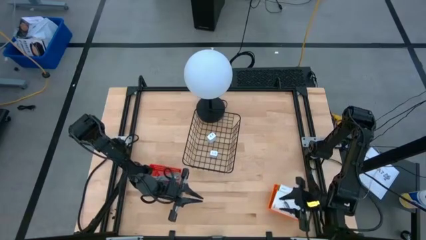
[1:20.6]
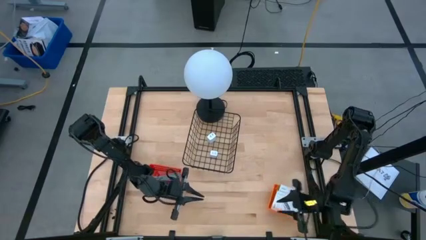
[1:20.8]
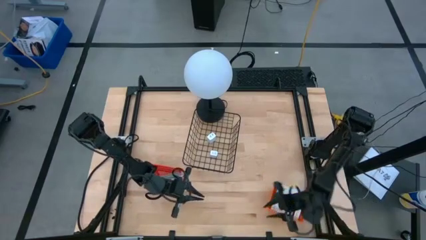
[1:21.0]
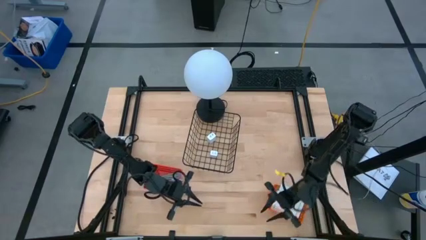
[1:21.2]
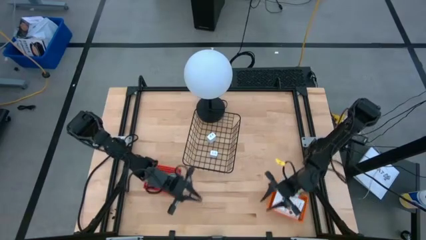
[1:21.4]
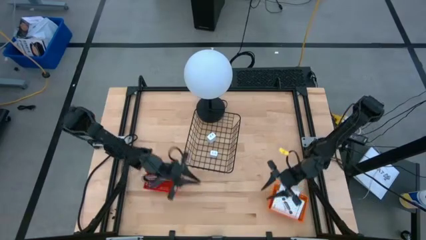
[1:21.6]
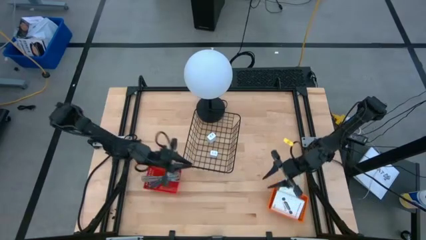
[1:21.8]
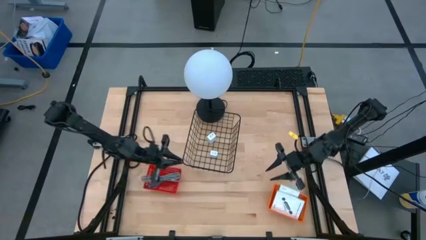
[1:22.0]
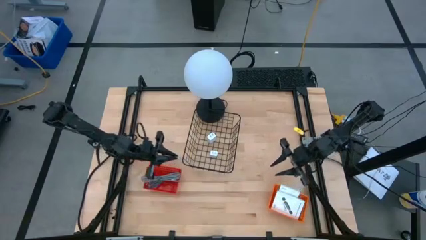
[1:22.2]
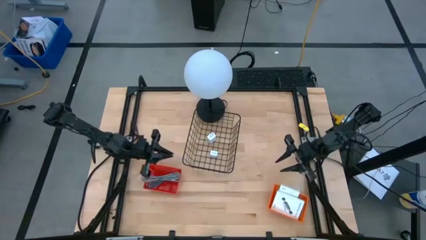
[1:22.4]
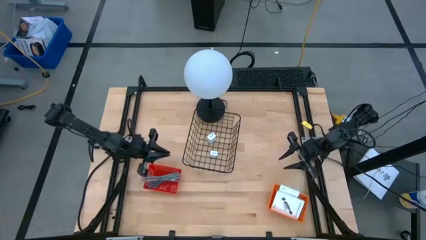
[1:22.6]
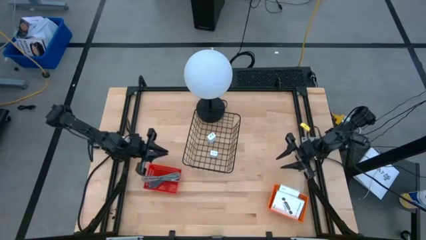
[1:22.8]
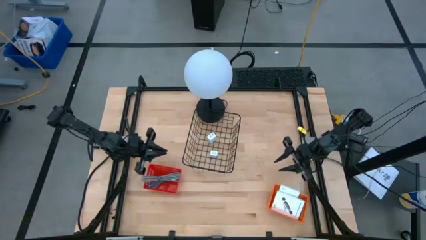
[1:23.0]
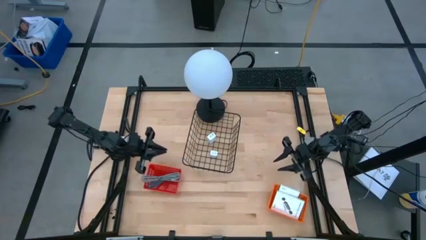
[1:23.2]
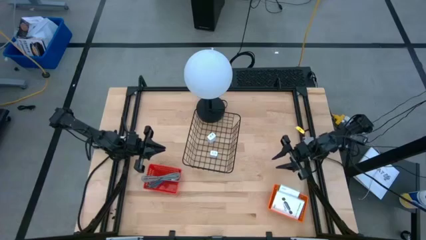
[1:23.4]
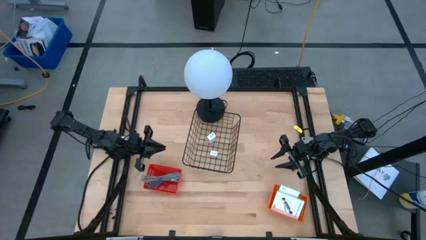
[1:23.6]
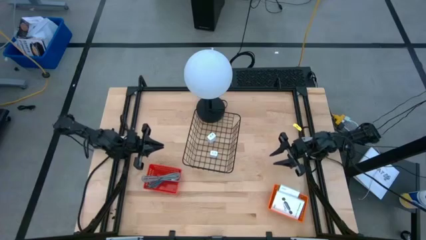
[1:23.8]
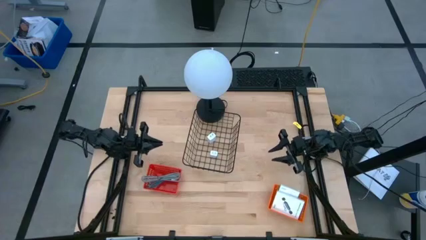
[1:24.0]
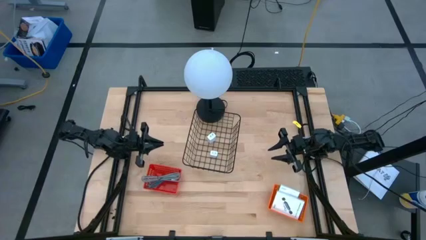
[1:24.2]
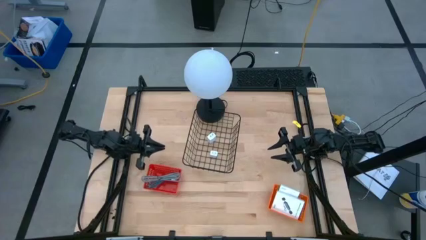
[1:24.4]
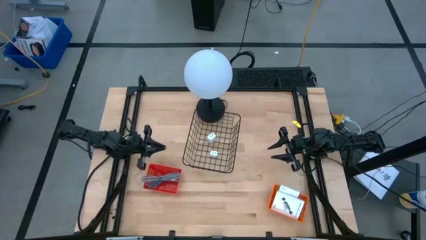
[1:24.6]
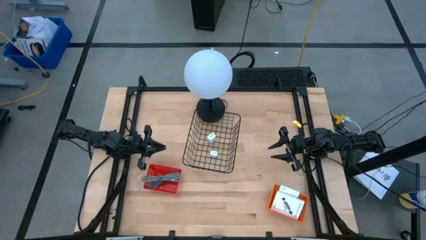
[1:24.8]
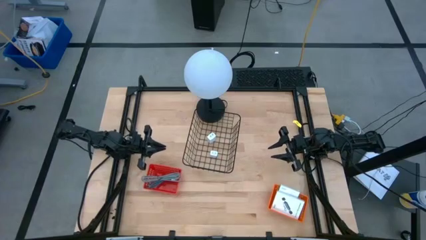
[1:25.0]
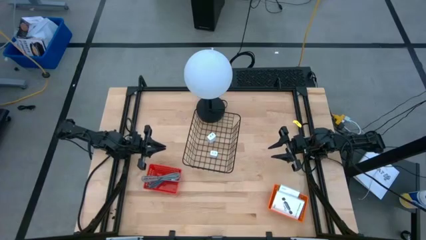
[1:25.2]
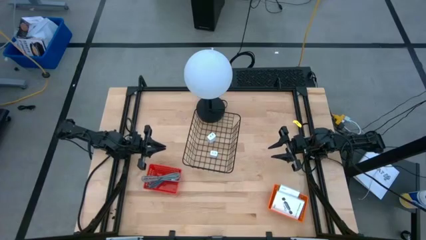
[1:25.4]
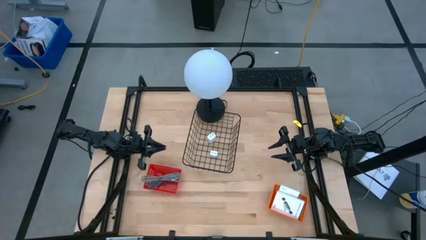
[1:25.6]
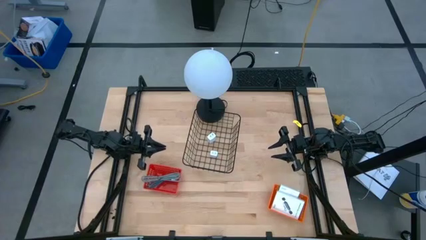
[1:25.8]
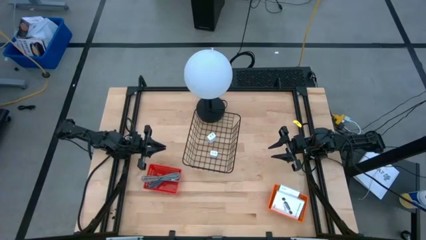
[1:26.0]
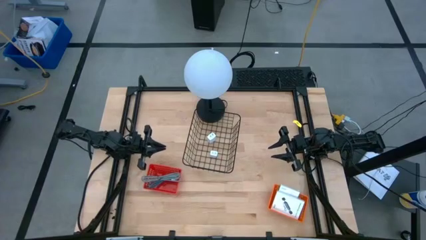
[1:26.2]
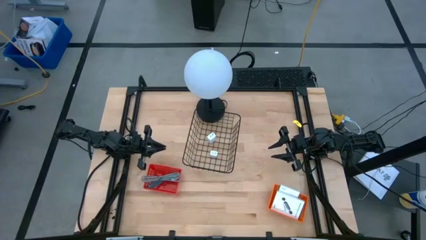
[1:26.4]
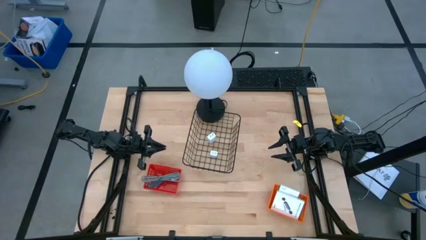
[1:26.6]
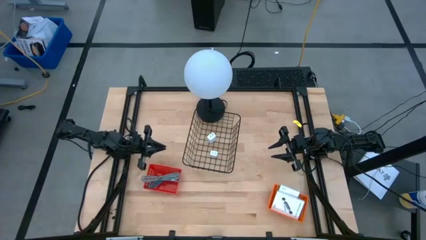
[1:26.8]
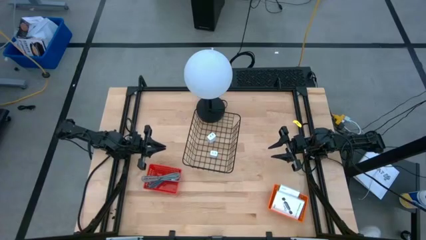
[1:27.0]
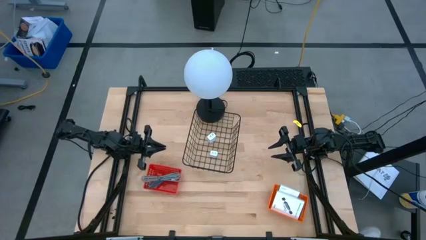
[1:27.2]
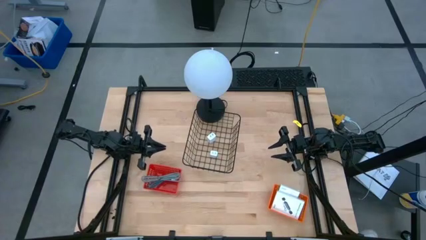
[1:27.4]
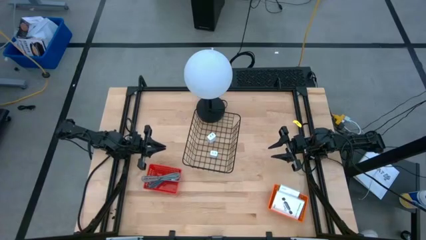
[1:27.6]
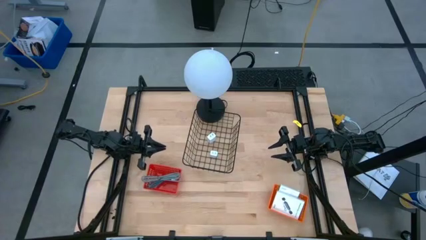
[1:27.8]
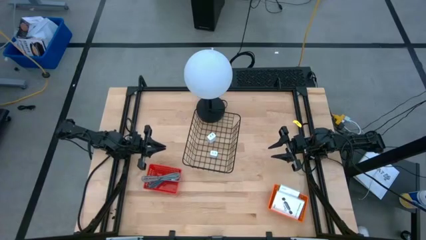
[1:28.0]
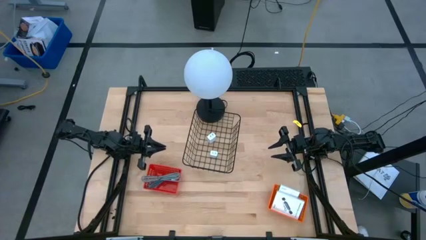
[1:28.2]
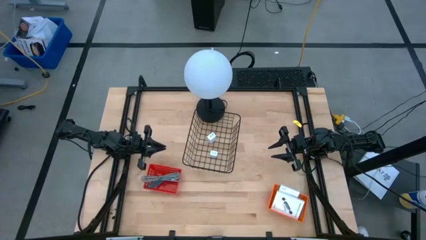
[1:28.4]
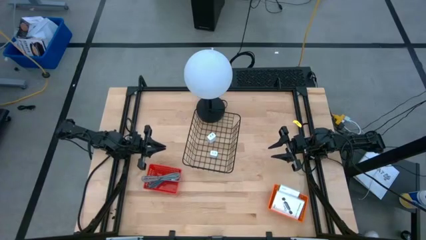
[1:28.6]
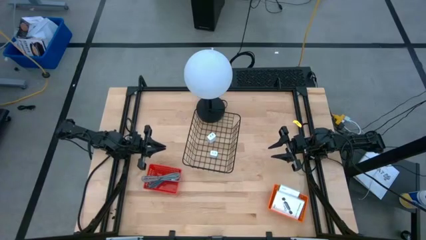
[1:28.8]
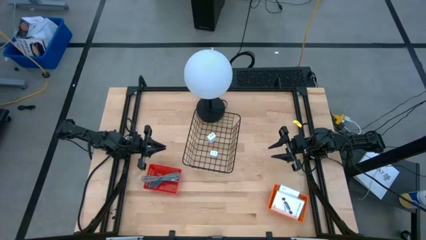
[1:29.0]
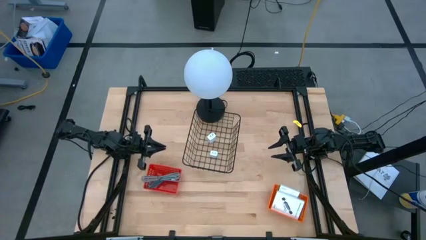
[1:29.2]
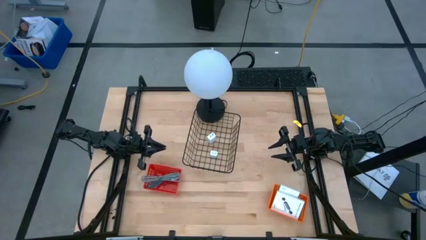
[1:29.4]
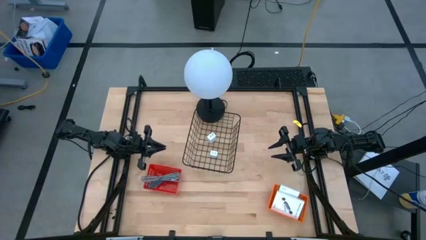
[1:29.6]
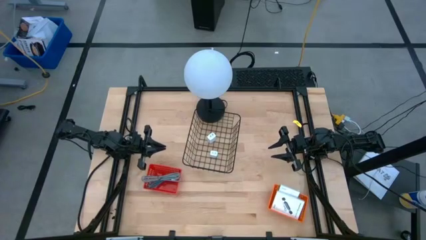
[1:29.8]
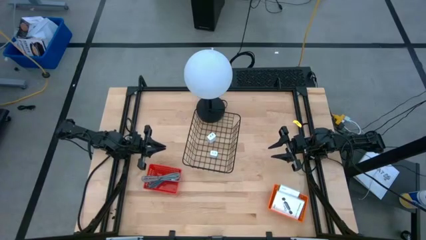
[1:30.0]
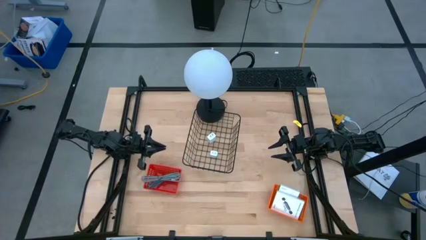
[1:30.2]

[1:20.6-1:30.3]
Task: Pick and place items into bin
Return to Home Position

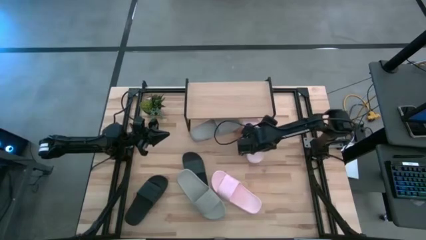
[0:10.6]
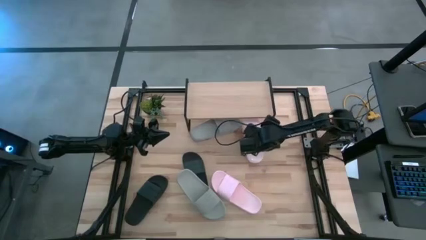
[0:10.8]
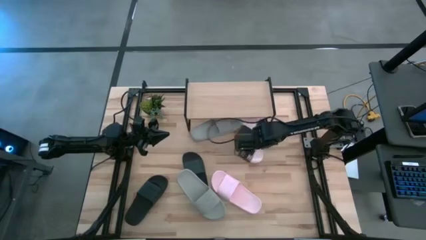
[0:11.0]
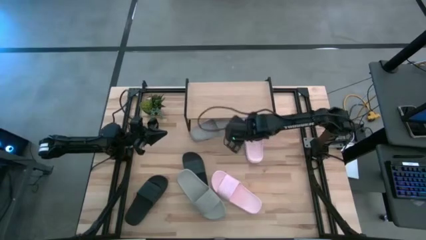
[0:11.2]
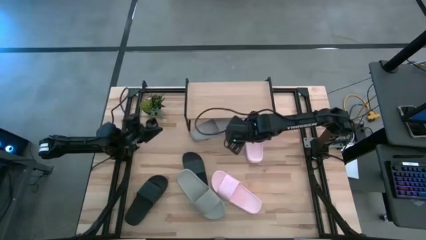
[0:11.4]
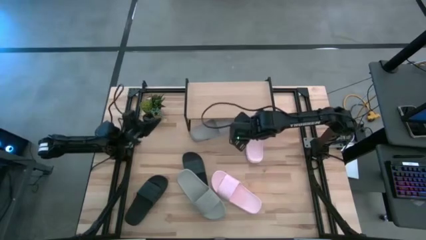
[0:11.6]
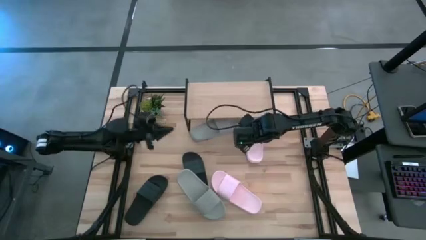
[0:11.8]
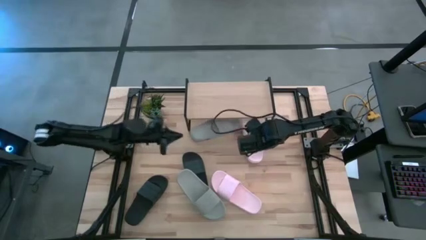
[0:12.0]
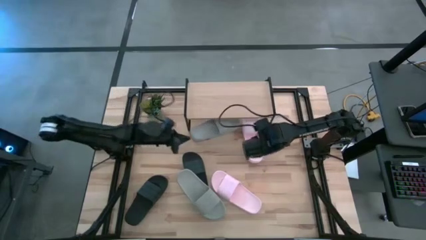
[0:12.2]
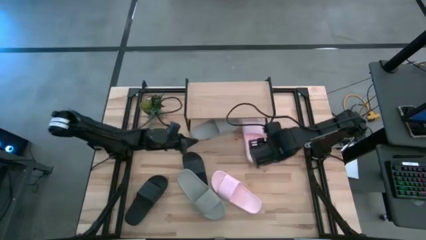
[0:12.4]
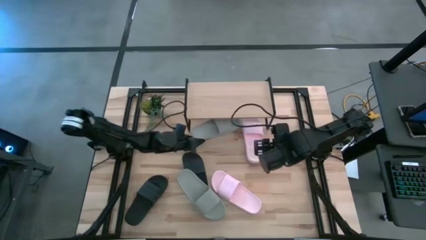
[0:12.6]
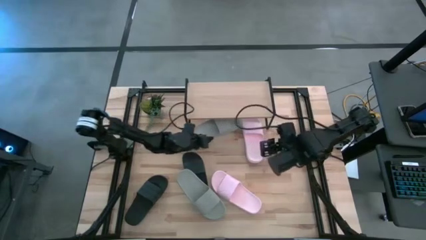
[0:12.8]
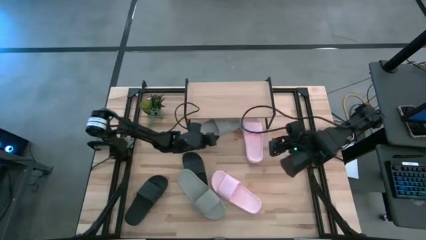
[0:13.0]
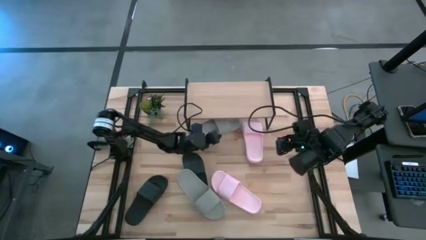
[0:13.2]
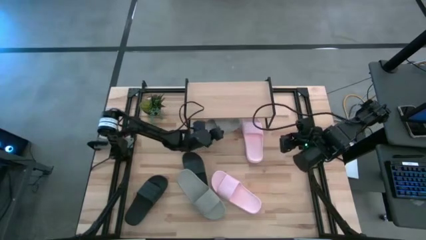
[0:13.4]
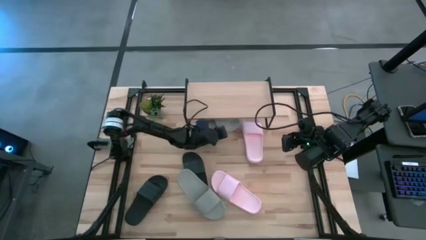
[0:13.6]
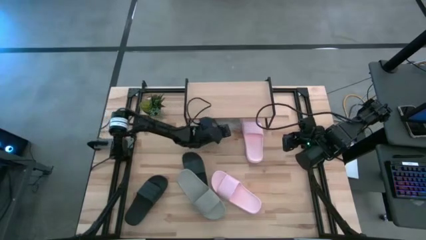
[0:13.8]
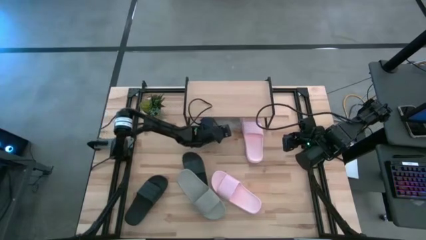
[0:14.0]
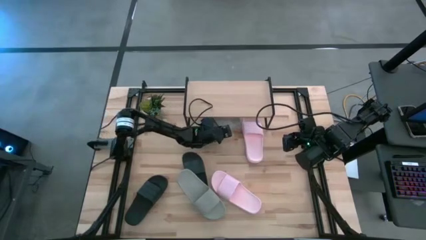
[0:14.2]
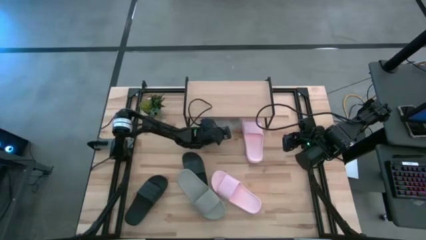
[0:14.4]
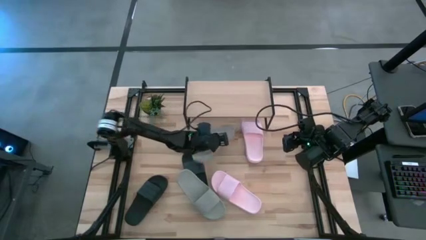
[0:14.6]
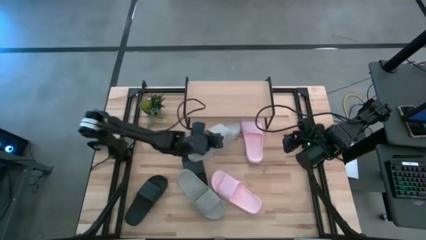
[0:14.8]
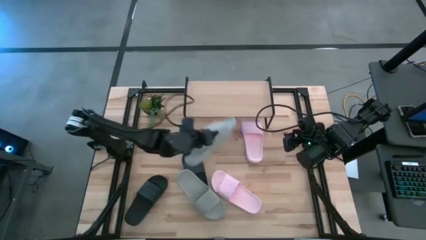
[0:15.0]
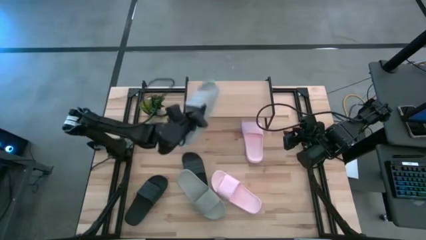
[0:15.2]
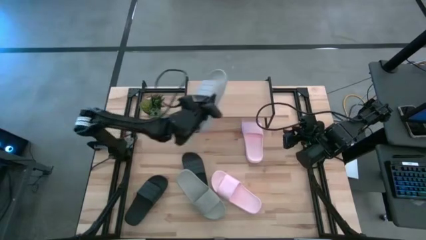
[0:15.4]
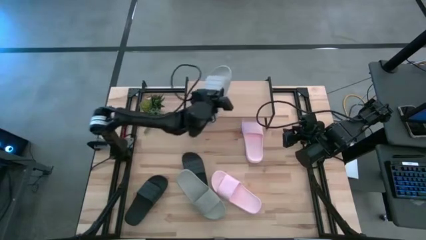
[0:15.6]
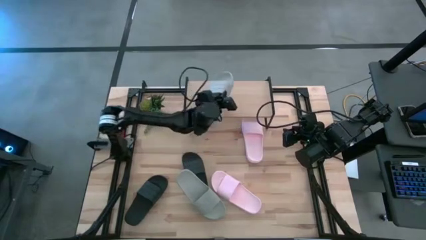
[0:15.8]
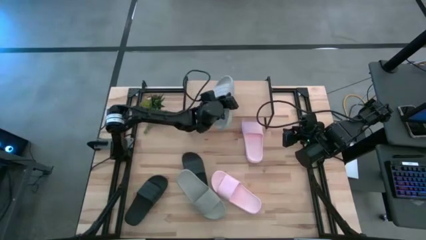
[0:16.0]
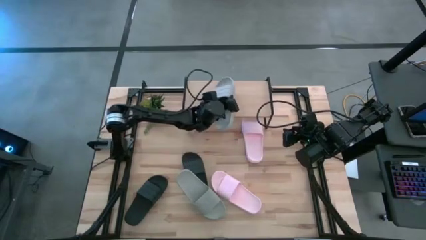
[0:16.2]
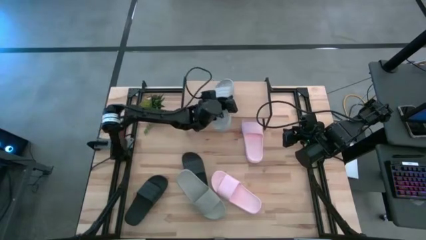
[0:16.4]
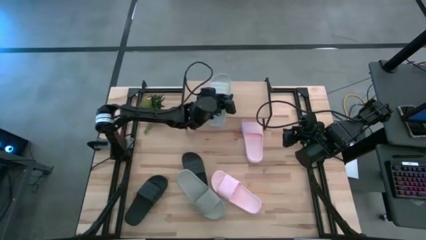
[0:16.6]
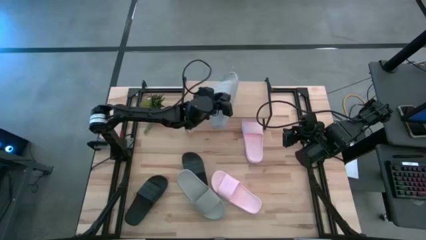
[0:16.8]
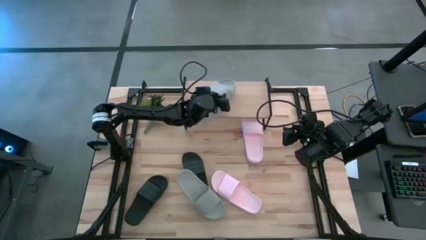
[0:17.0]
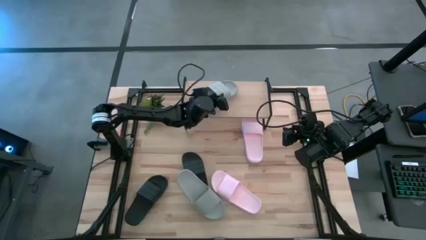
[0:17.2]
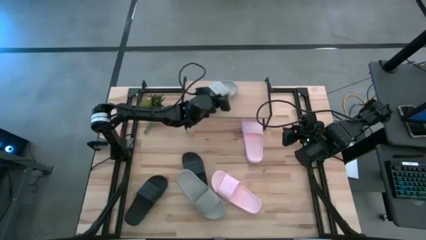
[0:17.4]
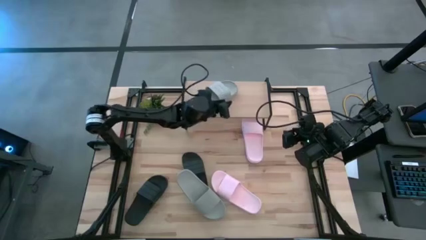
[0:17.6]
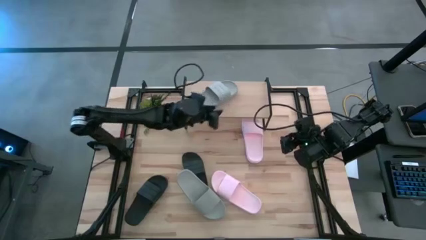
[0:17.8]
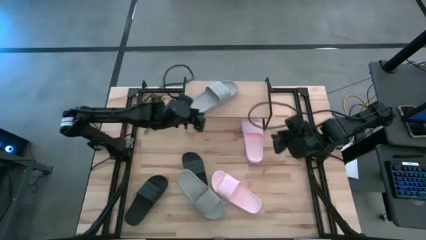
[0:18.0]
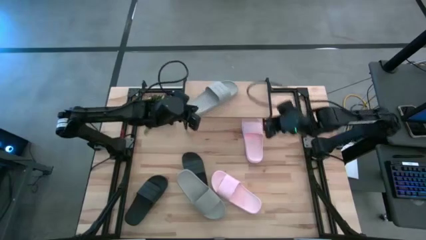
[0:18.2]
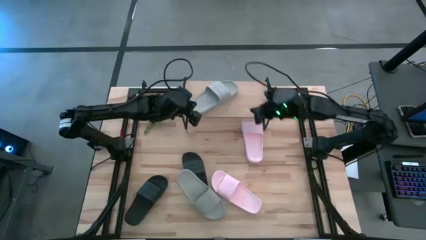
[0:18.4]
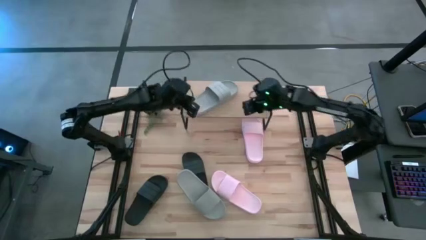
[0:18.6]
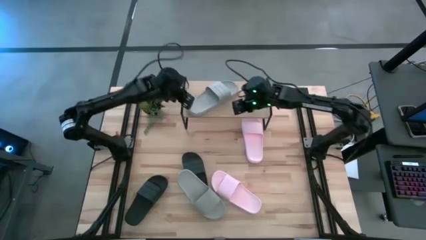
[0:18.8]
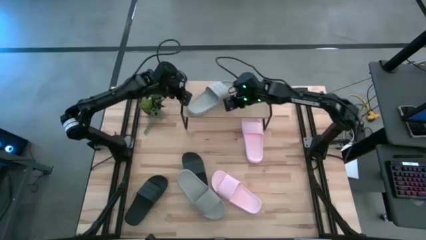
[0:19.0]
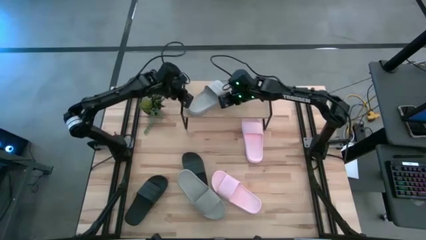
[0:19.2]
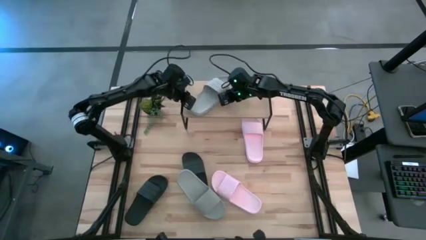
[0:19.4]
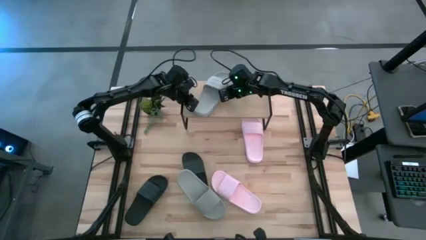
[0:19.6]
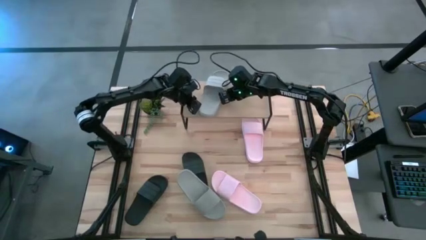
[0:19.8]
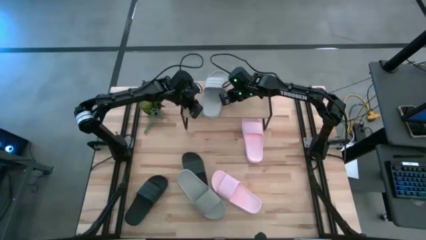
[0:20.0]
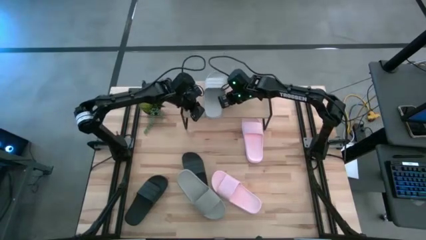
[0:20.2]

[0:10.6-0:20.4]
Task: Pick and place slides into the shelf
Put the top gray slide on the shelf
